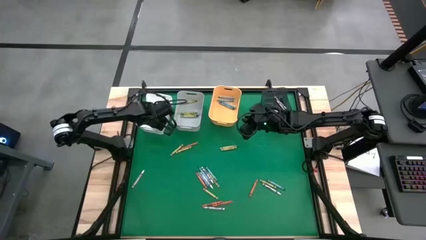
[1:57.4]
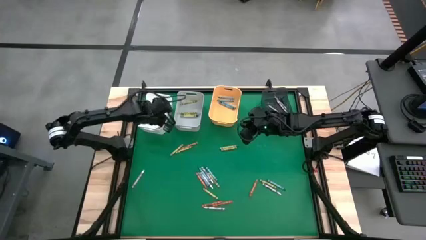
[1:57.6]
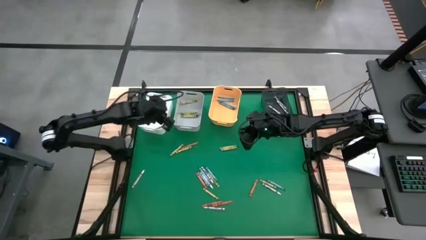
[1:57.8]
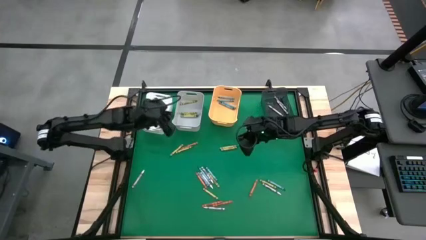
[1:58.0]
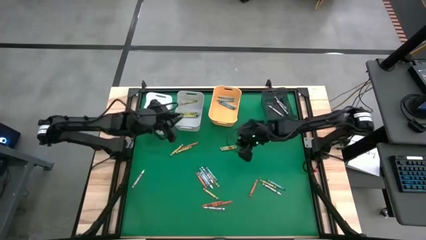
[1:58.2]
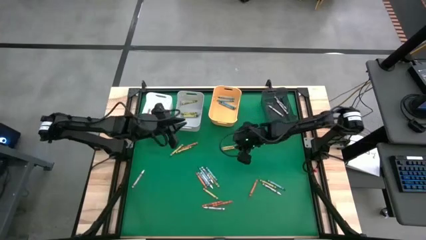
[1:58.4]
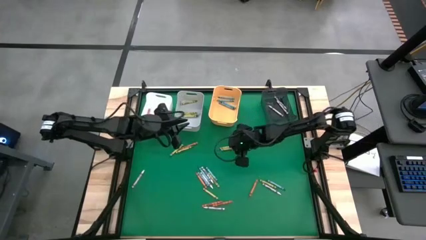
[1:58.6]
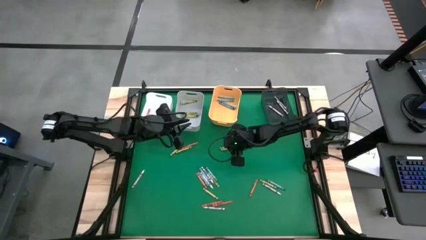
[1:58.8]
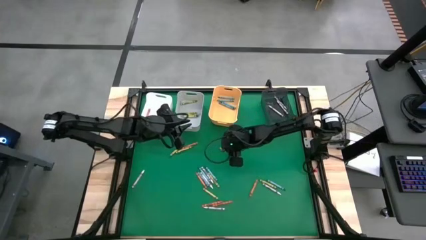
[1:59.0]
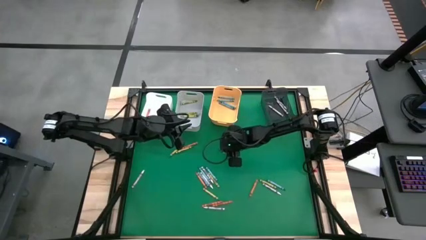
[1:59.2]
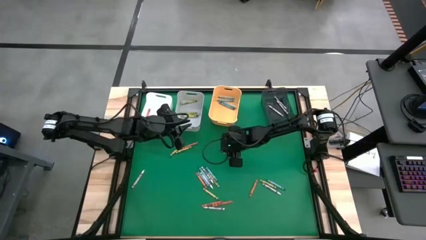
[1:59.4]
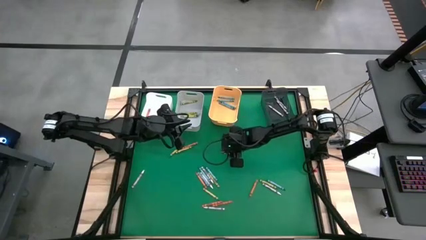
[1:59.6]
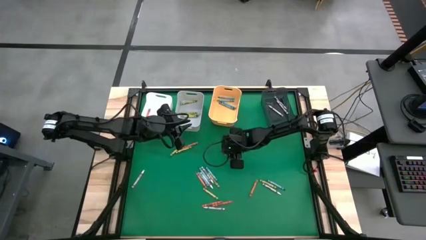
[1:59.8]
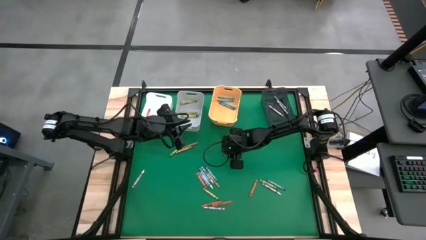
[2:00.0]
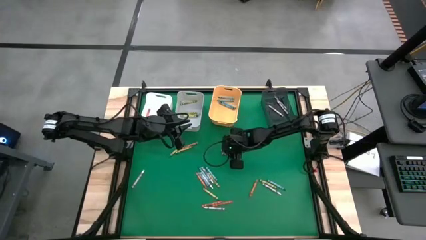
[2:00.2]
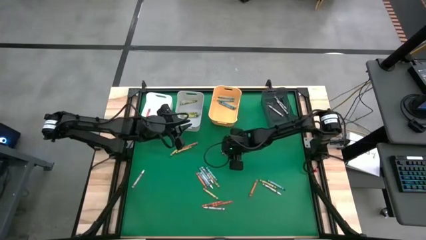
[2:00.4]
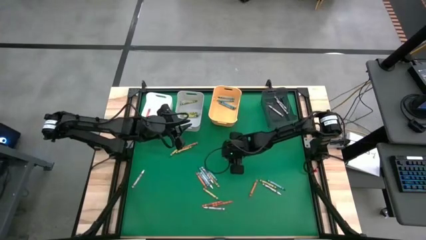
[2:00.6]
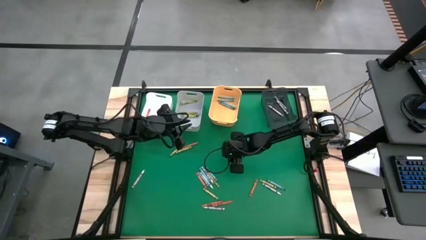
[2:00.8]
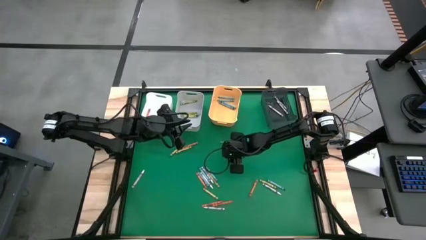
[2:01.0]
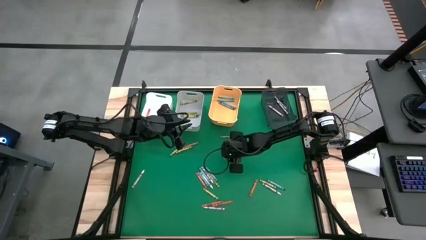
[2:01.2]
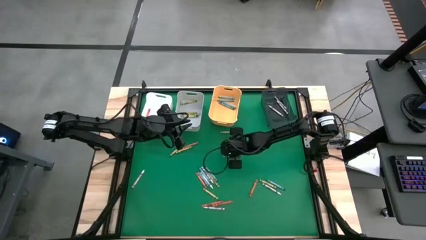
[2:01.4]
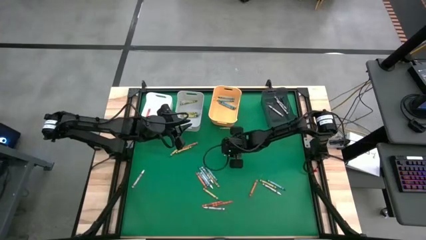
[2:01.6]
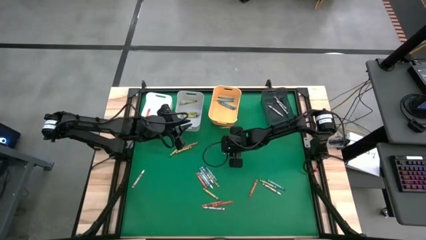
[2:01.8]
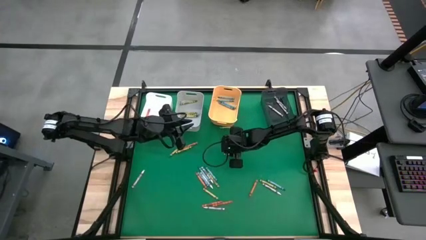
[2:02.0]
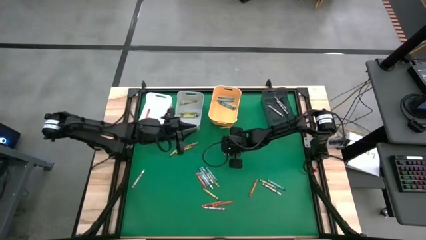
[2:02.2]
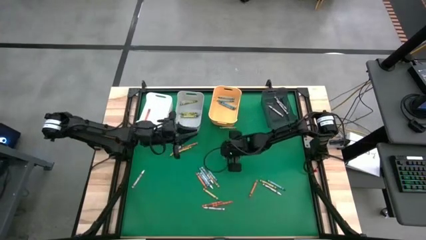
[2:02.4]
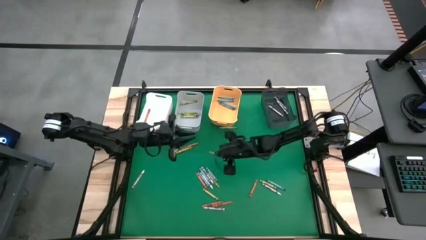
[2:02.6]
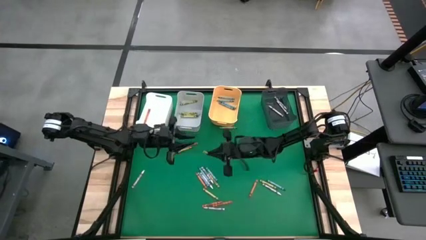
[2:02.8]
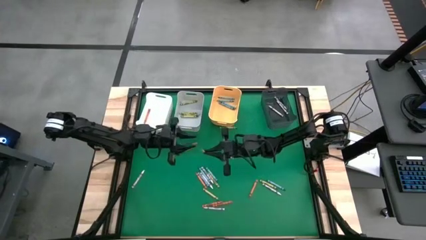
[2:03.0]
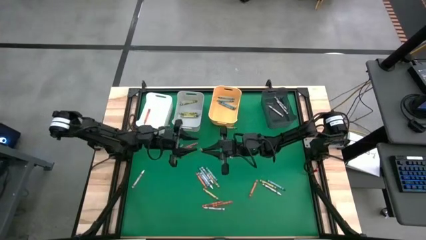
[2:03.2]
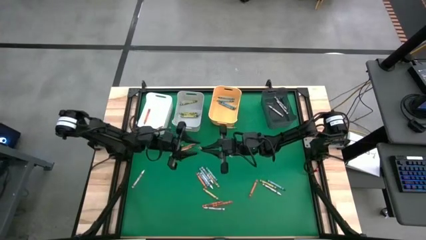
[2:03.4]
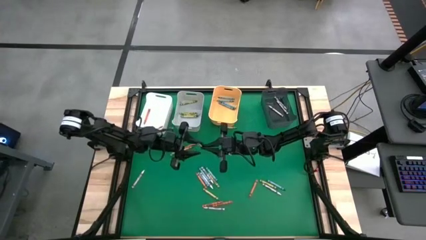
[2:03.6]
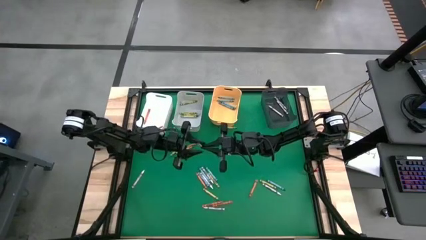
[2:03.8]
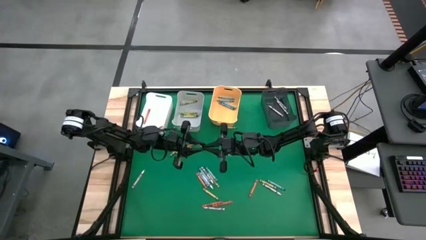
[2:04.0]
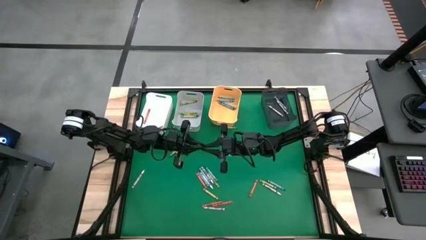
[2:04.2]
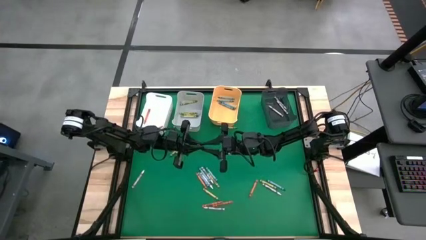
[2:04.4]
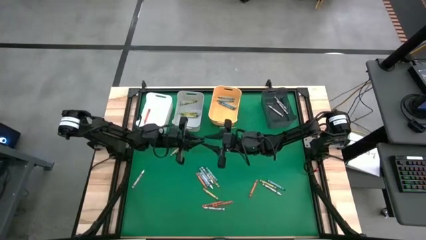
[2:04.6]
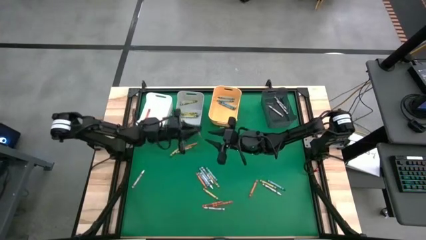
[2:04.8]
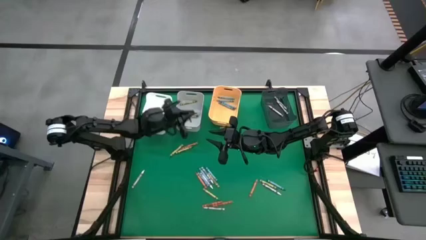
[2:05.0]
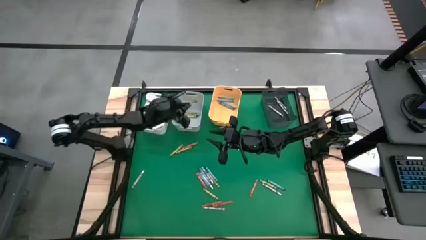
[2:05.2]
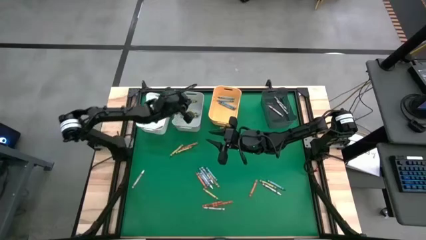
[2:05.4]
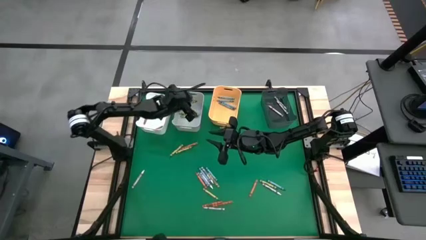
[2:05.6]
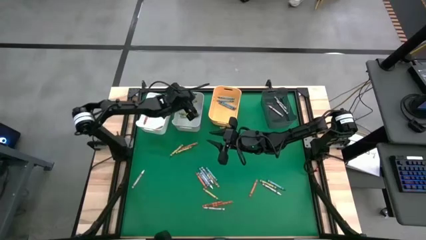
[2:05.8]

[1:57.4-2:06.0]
Task: Sort crayons
Put the green crayon into the gray bin

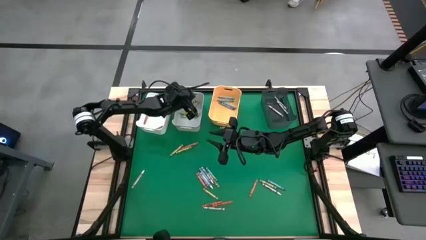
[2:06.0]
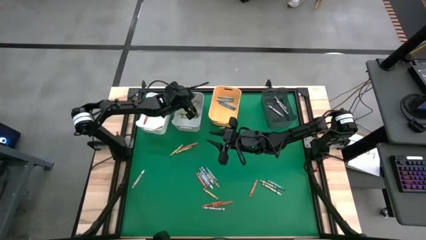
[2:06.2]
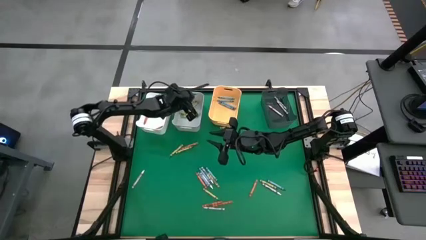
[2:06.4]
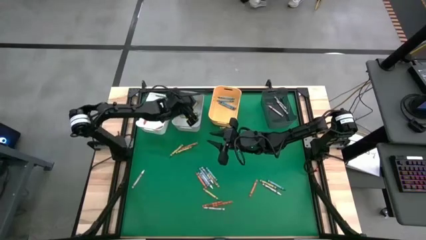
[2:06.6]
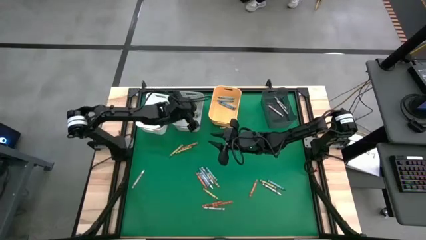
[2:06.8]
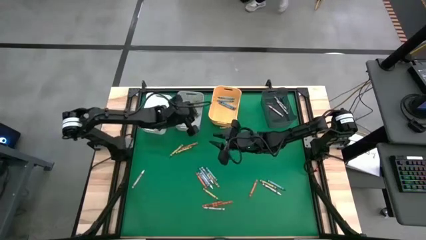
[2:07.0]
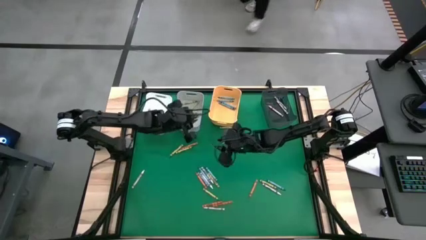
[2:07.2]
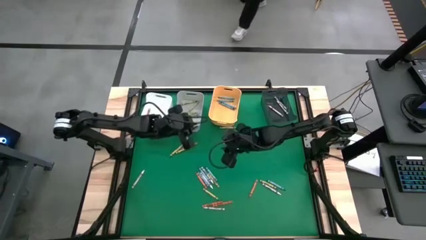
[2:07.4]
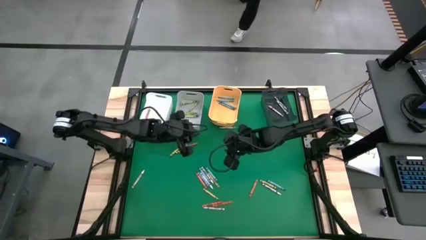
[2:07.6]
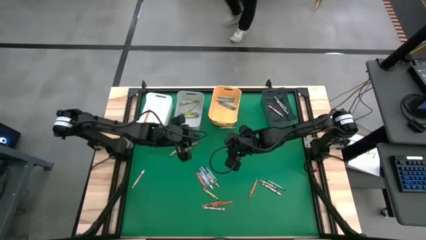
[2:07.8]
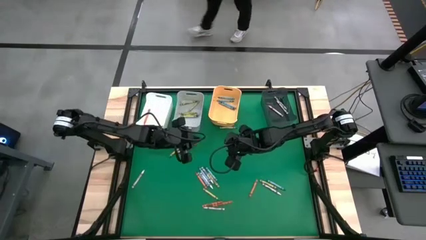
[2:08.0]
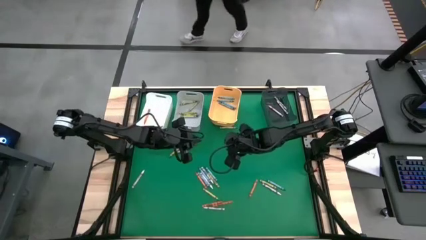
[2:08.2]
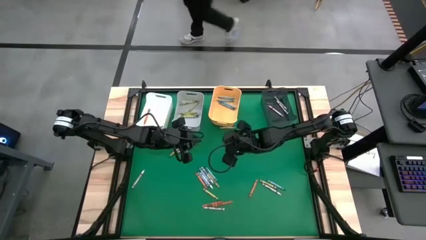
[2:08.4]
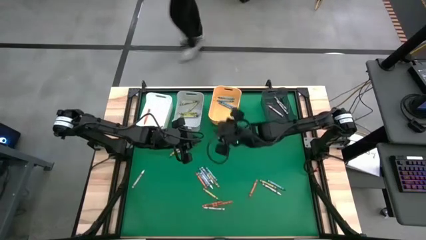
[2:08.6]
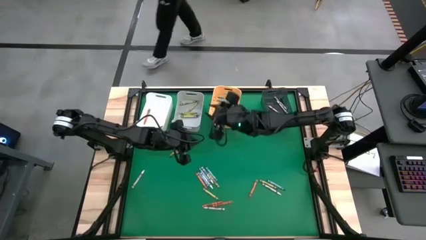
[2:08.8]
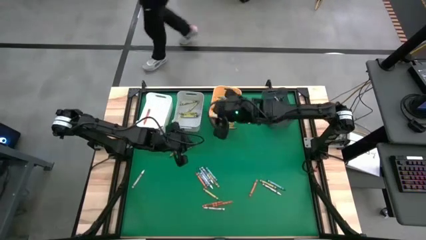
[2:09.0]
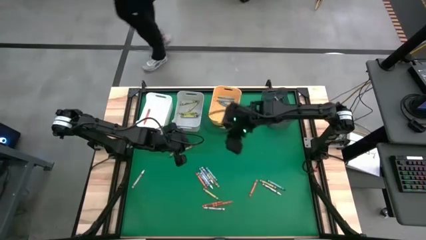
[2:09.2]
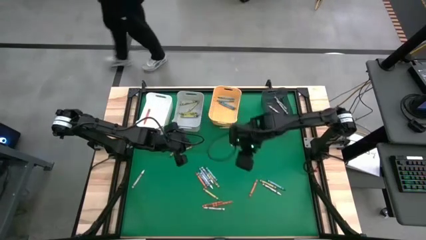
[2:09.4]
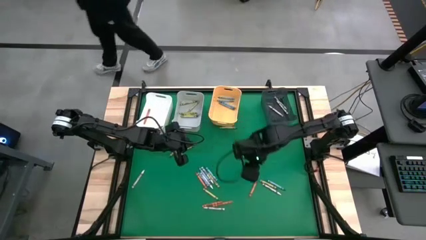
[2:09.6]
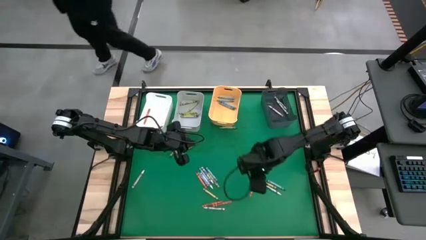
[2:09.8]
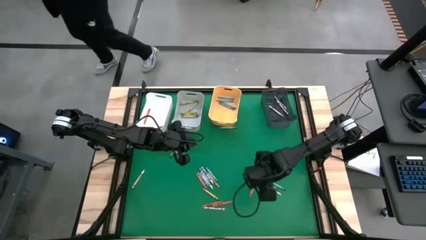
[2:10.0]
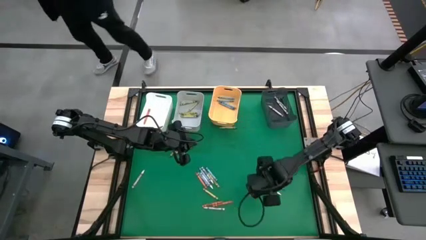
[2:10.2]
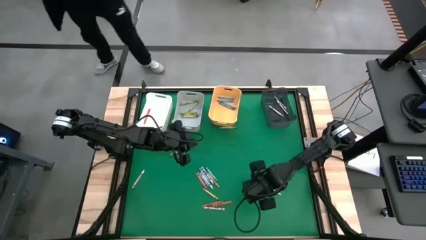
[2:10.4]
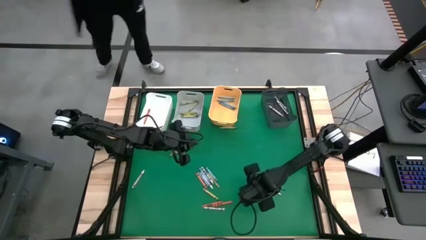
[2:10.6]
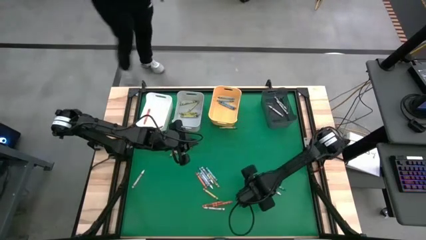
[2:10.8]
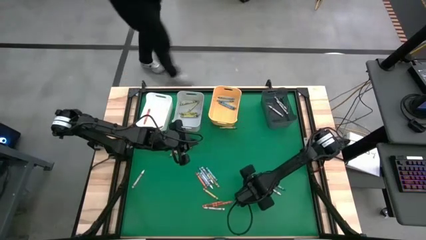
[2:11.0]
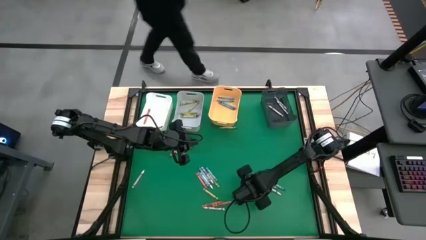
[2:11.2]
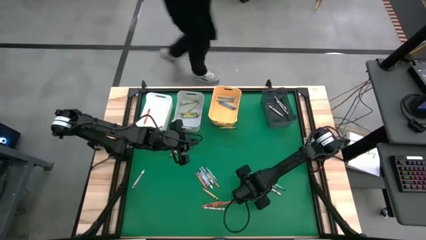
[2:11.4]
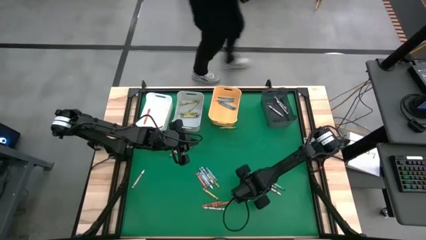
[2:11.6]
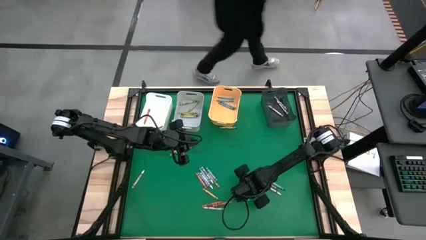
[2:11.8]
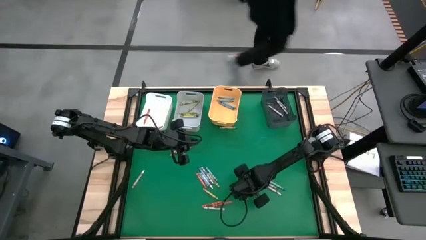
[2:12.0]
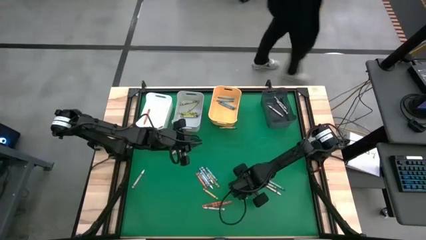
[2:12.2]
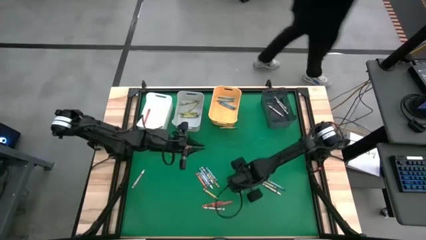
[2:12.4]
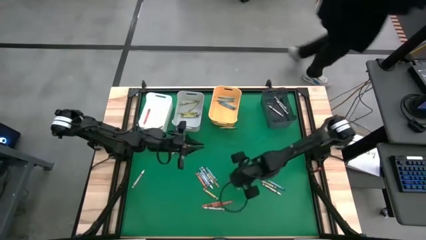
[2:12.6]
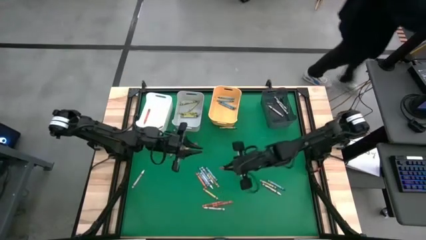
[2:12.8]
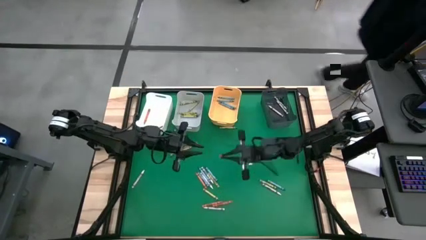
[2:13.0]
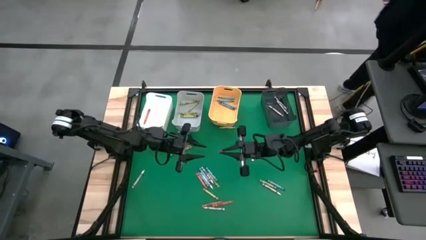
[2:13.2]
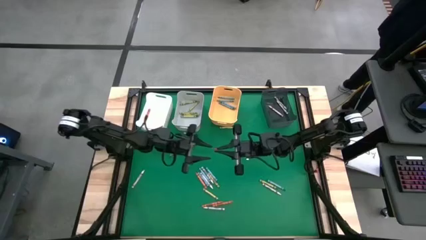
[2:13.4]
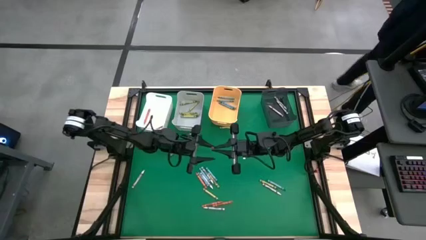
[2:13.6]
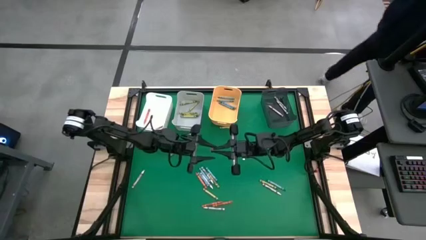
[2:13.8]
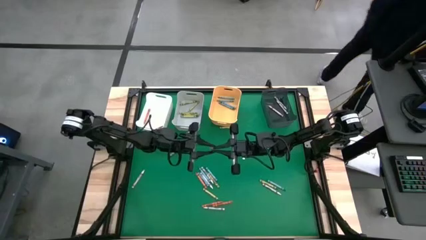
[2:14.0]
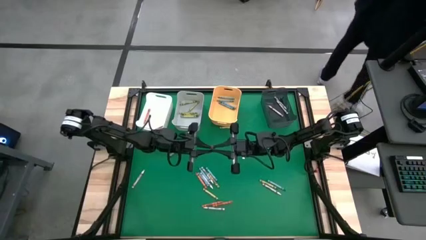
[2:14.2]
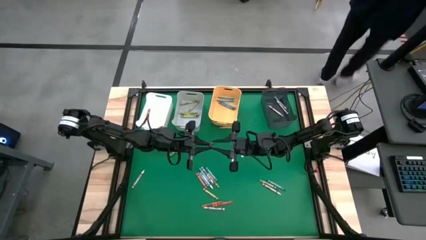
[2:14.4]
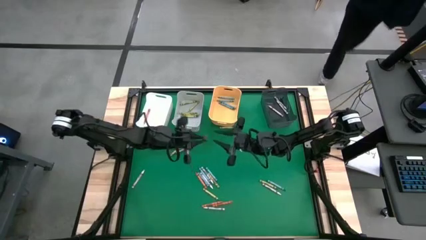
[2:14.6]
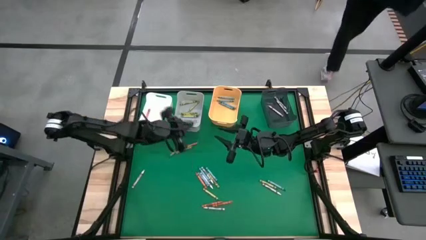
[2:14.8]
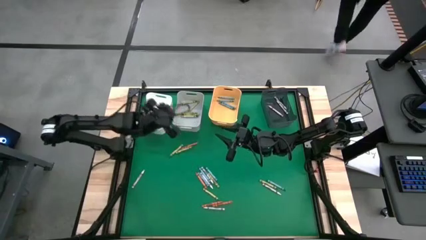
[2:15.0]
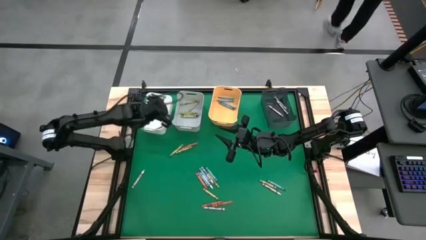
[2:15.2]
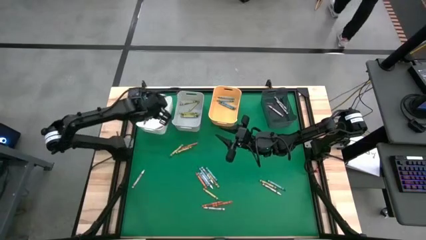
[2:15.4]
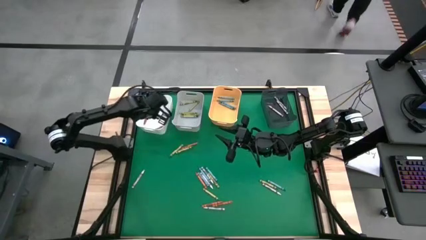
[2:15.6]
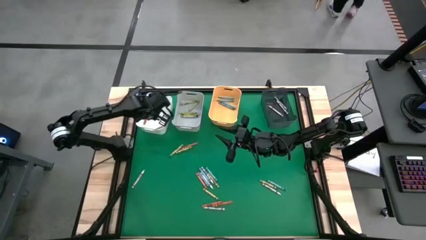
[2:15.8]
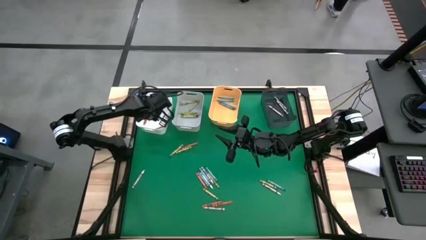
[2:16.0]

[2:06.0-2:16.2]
Put the orange crayon into the white bin
